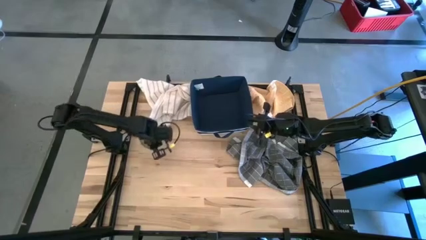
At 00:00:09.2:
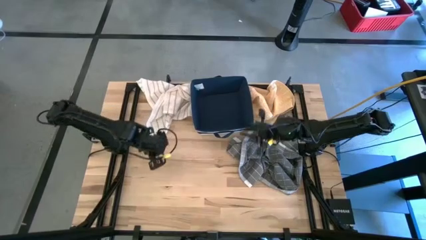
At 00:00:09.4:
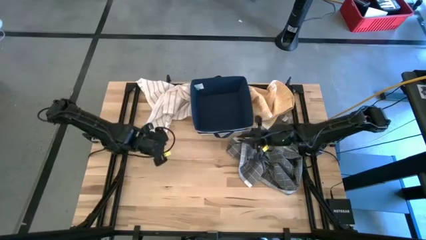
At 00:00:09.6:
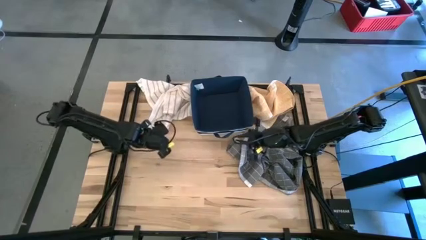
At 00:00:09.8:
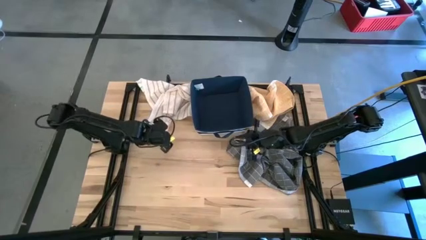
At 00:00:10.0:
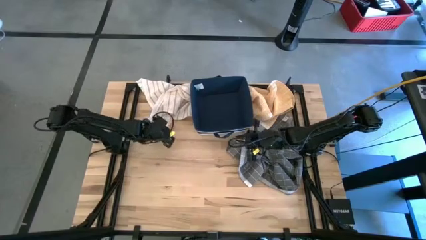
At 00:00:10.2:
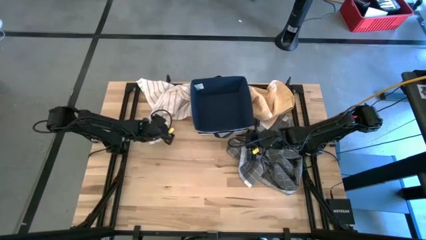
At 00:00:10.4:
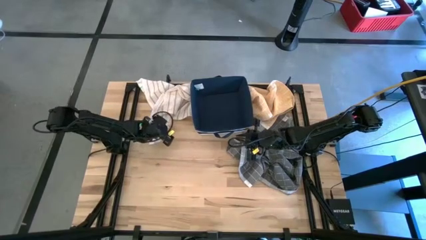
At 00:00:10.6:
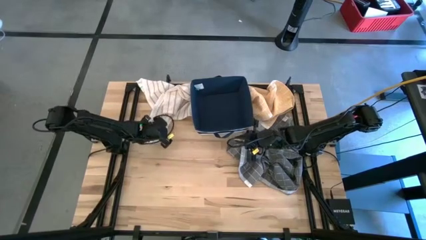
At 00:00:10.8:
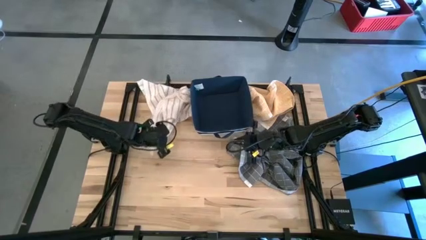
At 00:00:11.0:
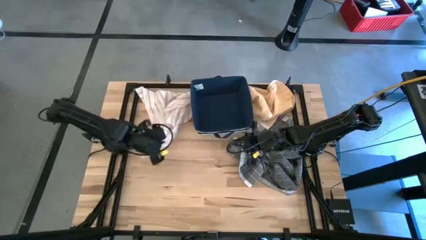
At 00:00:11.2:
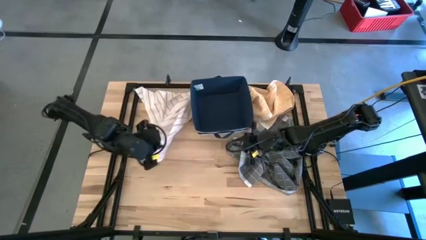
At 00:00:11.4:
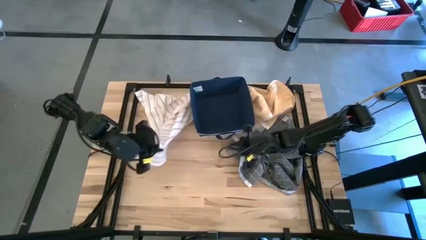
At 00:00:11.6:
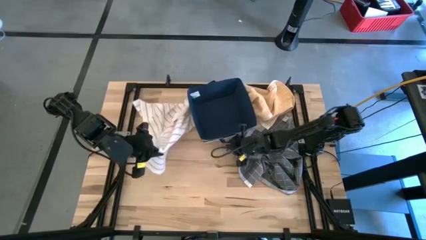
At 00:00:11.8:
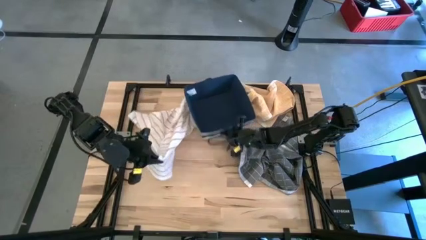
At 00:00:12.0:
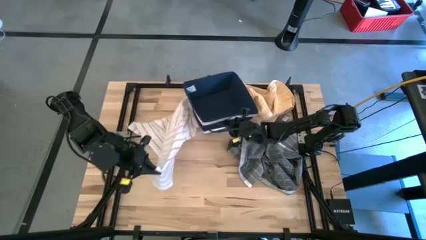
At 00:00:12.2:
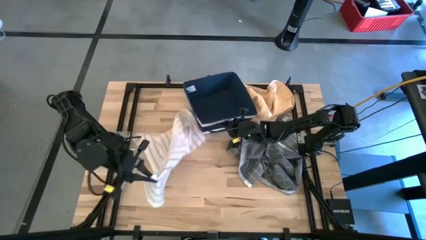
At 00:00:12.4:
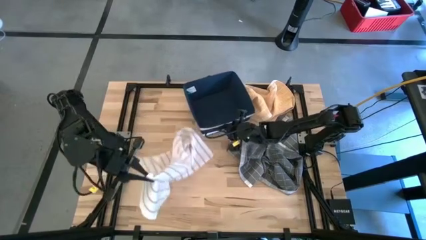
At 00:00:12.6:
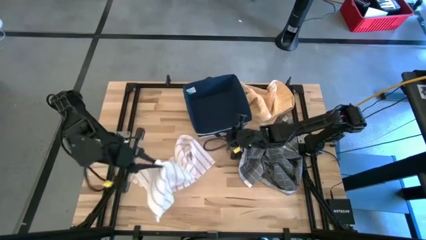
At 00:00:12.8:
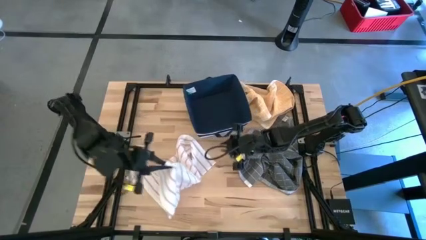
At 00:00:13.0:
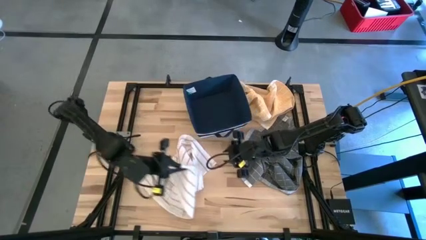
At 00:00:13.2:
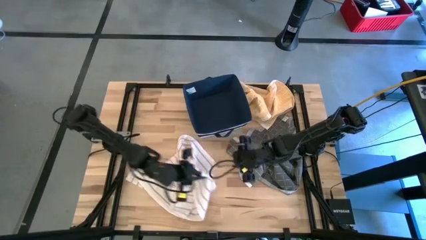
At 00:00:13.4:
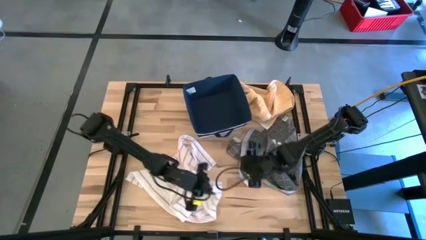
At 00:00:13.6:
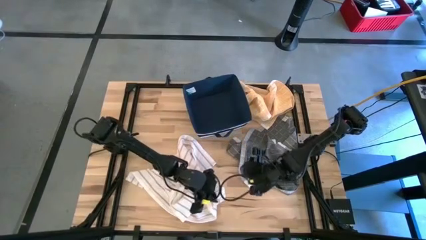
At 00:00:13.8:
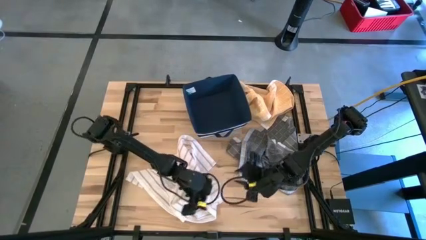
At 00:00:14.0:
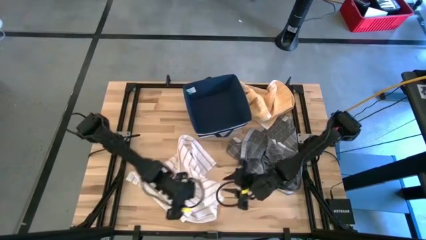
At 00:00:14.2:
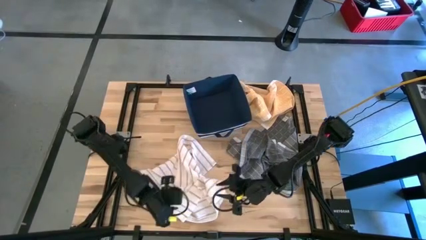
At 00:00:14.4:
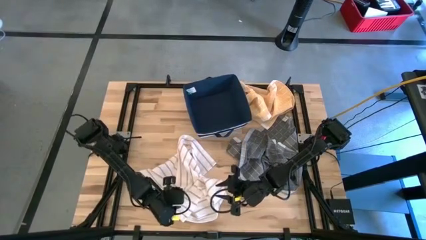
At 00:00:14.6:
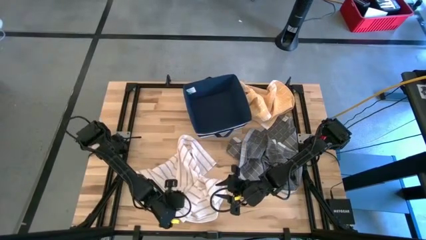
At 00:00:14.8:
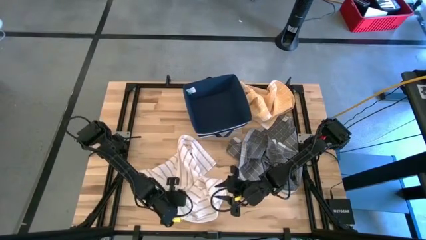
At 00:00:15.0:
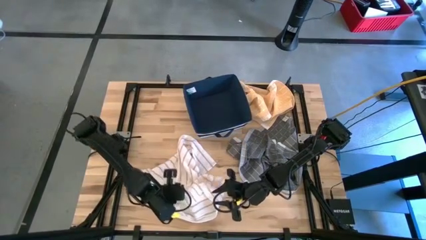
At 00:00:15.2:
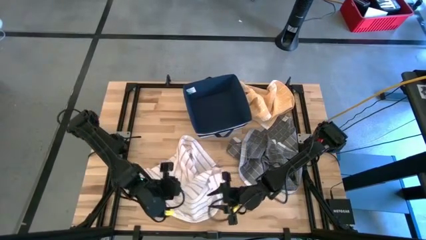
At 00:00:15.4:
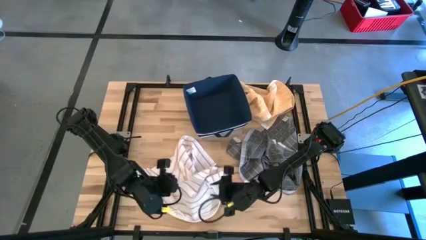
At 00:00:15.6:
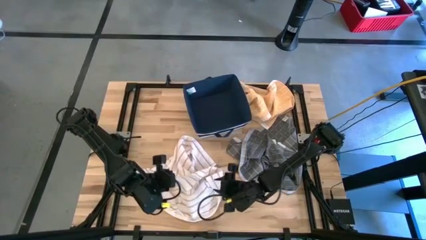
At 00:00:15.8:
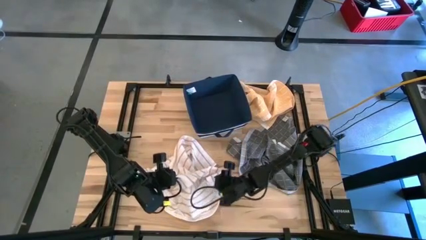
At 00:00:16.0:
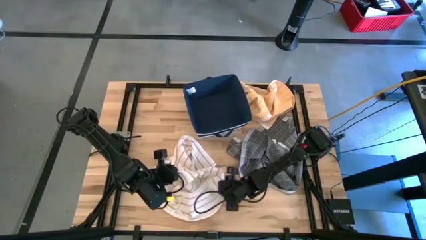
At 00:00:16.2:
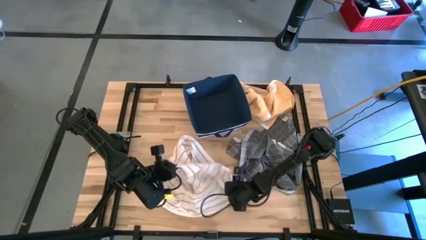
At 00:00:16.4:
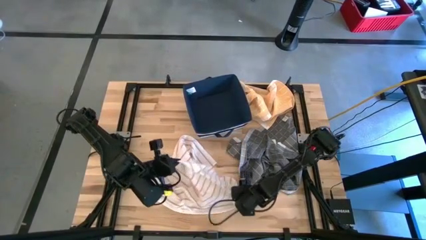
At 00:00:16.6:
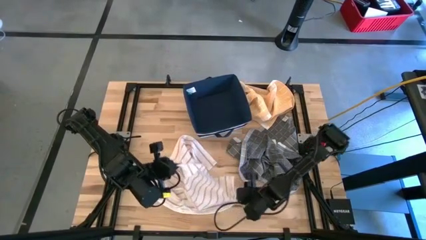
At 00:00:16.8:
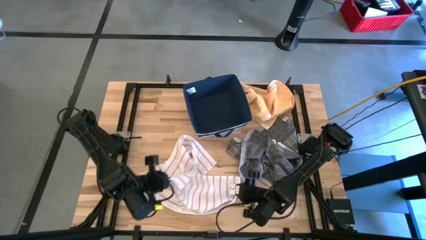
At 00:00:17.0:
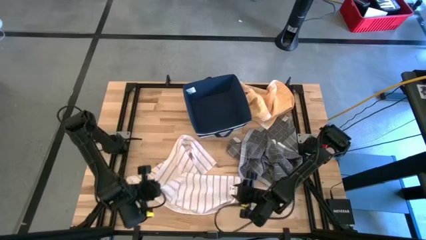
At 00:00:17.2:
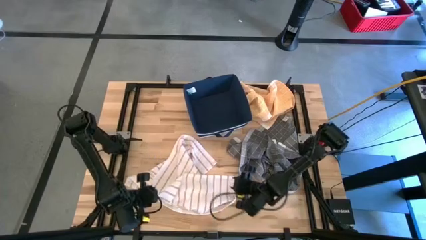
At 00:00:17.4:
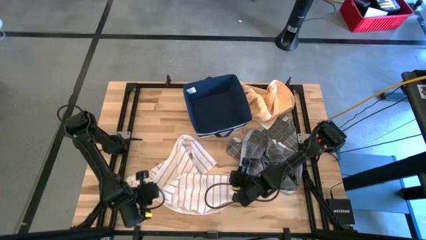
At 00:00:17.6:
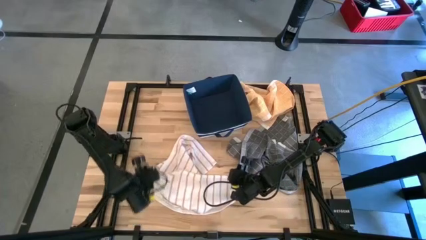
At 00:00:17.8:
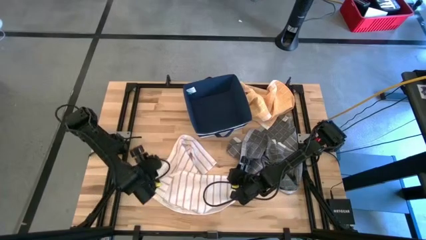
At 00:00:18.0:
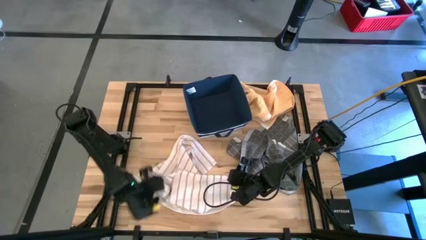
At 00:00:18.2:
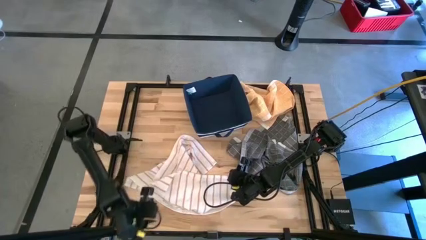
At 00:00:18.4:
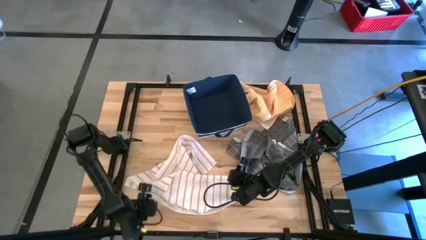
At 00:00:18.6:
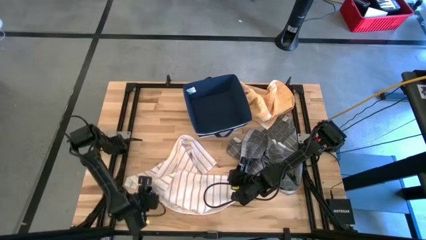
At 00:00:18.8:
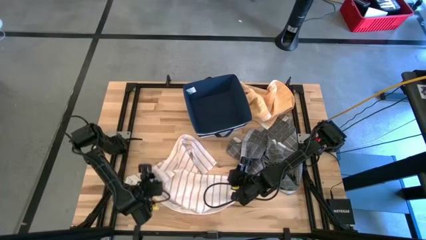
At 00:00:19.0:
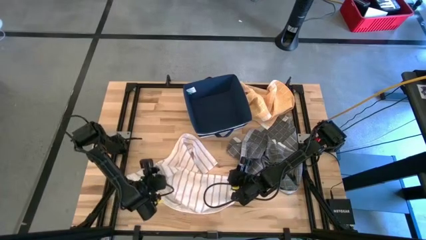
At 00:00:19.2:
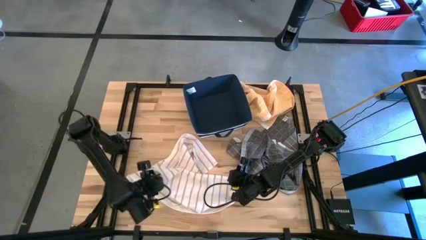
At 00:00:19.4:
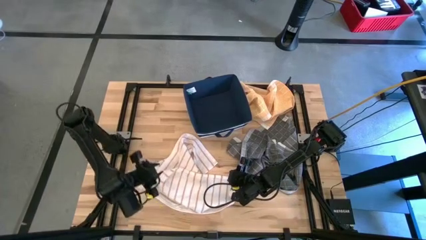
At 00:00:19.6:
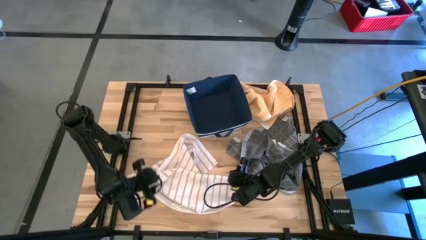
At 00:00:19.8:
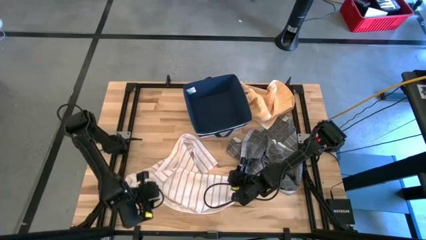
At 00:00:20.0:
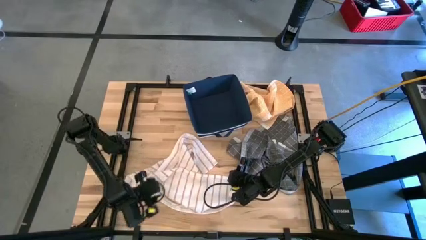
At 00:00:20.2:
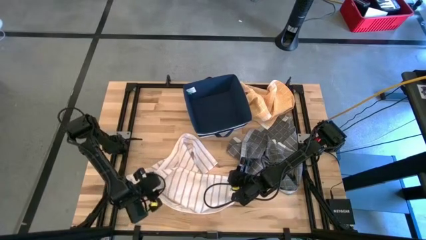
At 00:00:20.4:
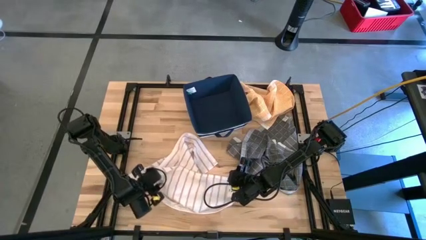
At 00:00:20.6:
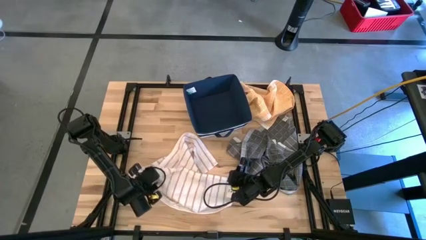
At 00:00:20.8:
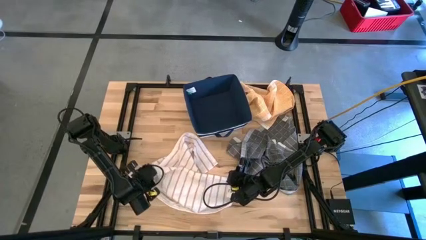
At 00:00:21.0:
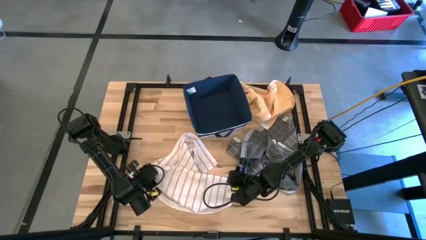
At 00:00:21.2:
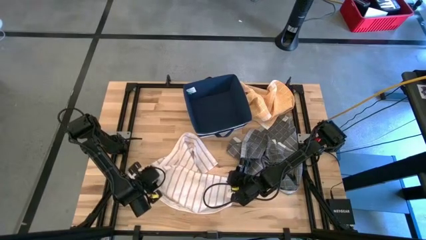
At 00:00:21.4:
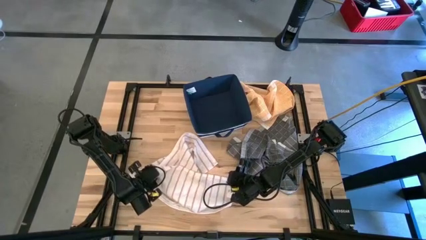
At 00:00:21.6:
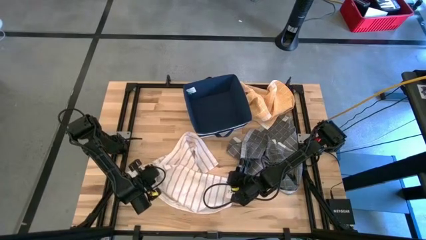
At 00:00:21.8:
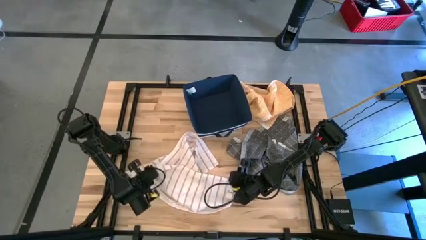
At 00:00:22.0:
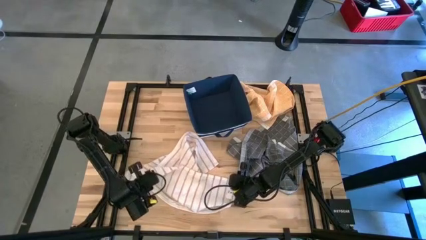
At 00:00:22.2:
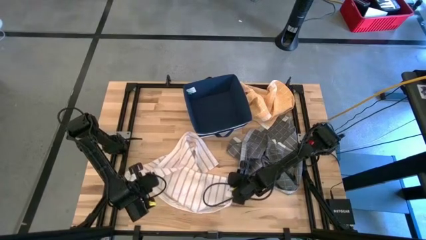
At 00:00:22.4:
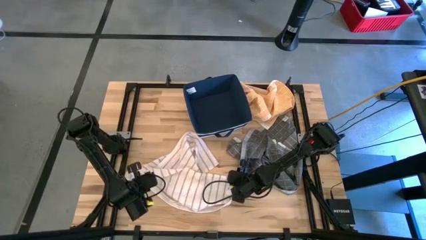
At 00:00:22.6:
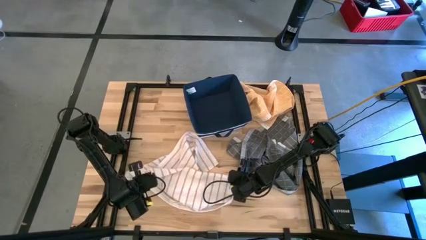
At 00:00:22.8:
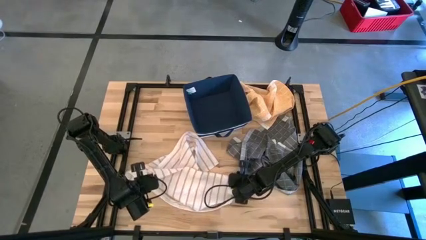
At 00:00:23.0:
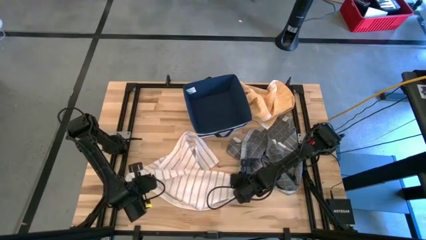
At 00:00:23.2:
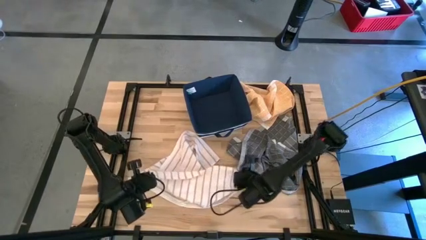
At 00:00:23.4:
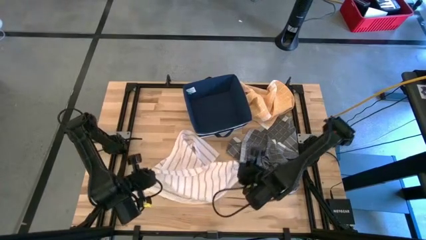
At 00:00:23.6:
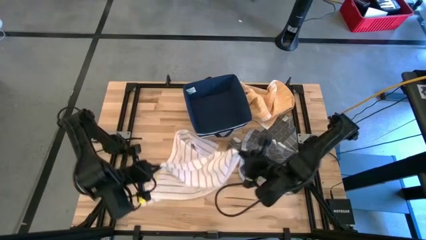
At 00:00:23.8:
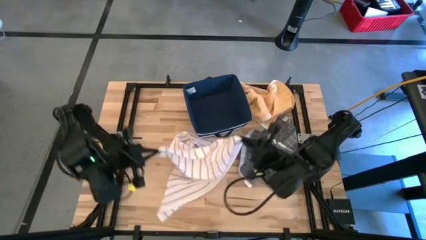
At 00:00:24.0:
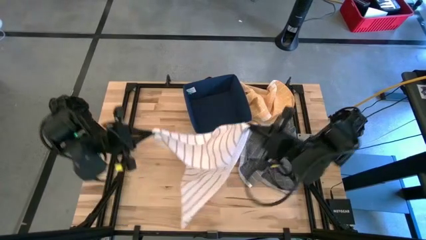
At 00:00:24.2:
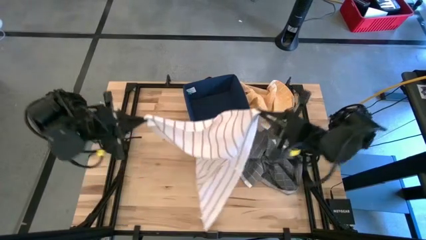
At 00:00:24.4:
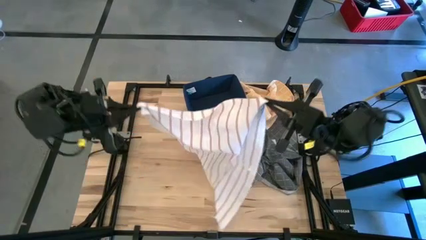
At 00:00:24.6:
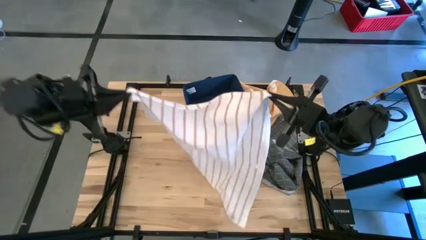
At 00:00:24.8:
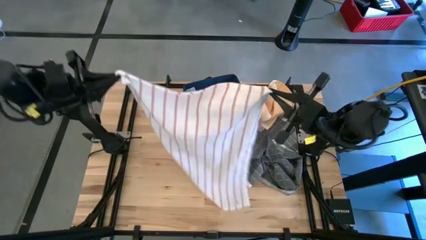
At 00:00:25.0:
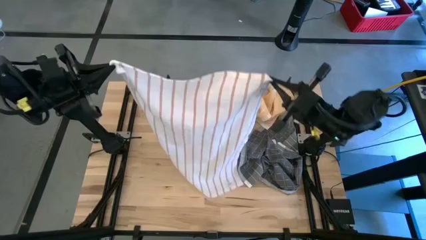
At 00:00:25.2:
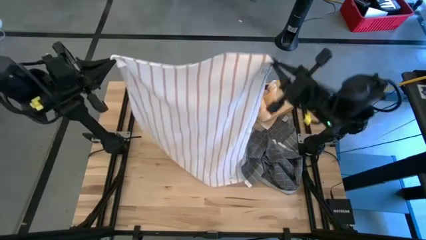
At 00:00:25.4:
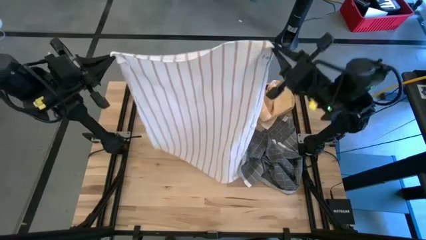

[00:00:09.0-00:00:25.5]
Task: Fold towel
Fold the white towel
